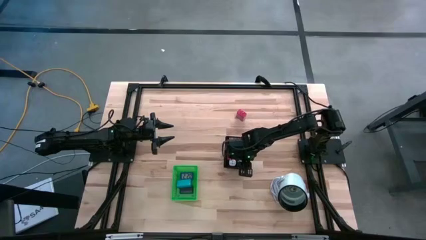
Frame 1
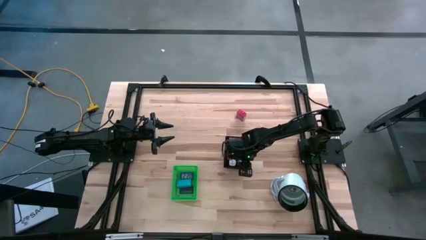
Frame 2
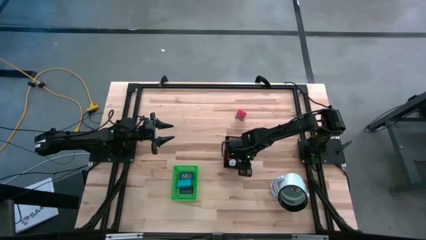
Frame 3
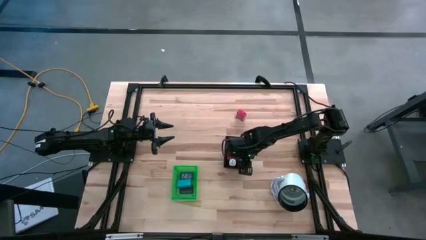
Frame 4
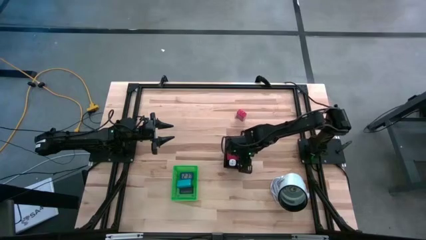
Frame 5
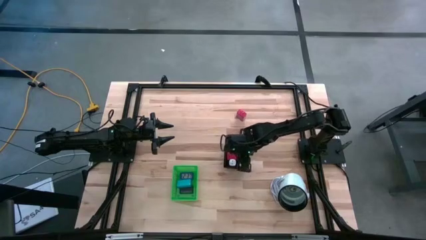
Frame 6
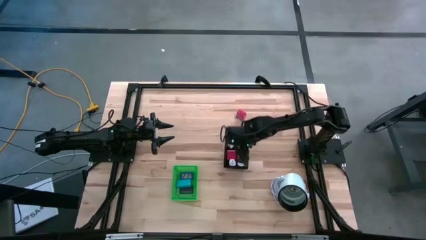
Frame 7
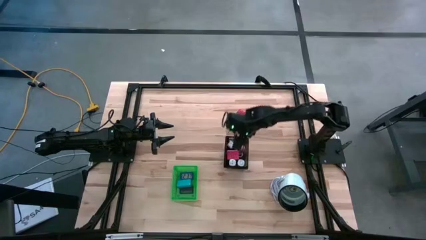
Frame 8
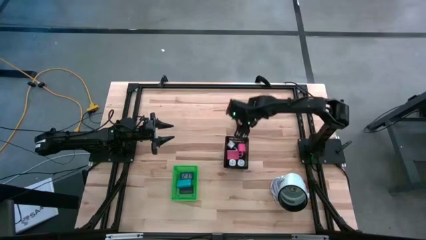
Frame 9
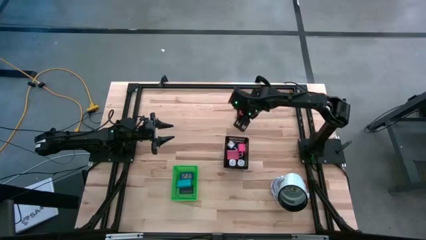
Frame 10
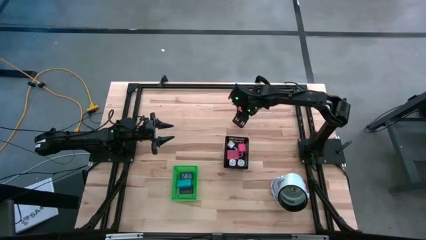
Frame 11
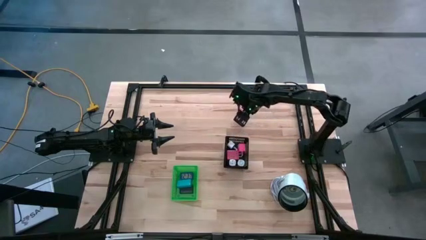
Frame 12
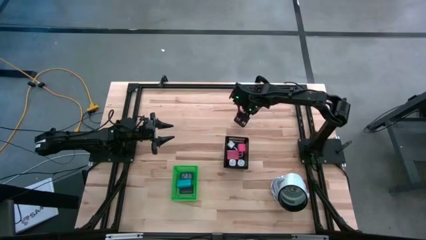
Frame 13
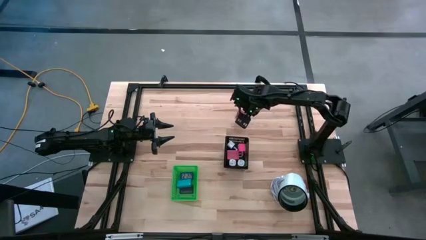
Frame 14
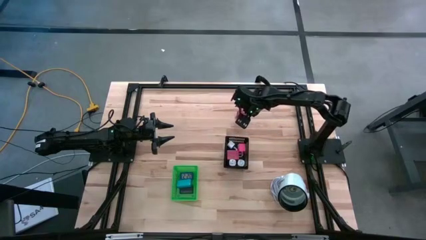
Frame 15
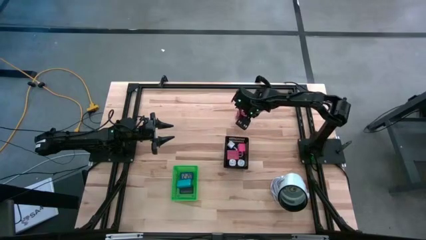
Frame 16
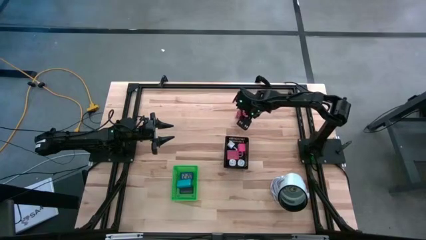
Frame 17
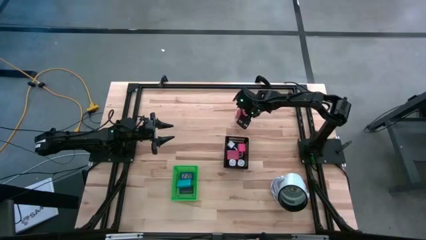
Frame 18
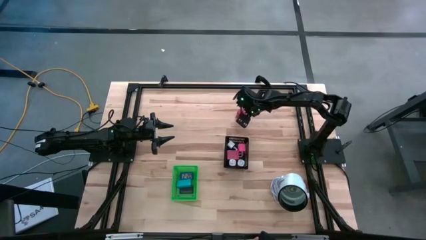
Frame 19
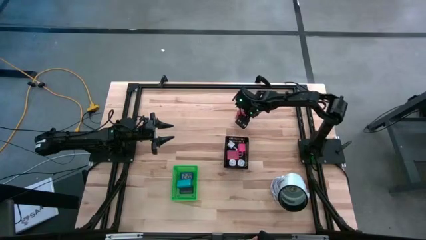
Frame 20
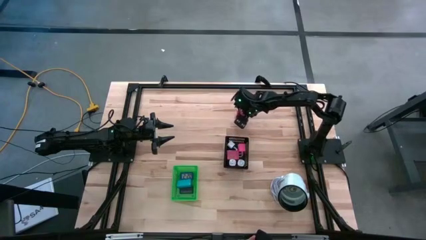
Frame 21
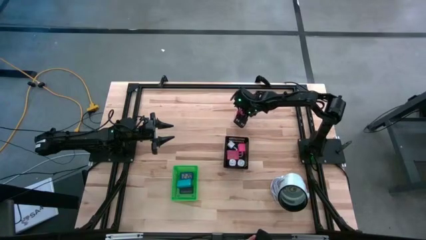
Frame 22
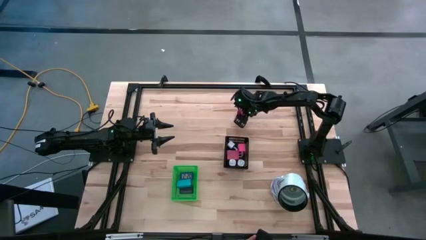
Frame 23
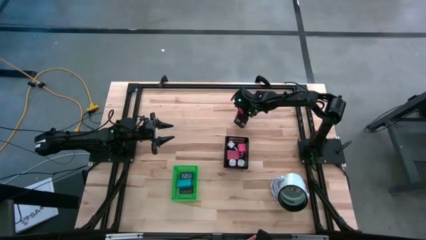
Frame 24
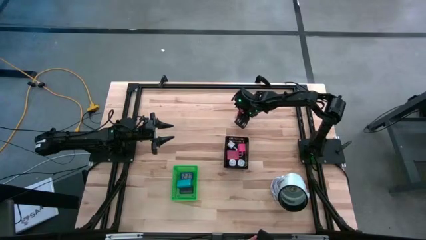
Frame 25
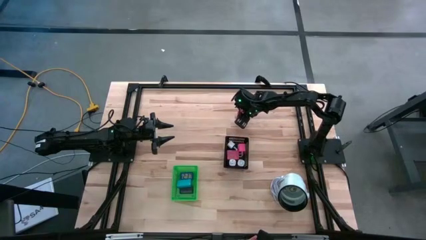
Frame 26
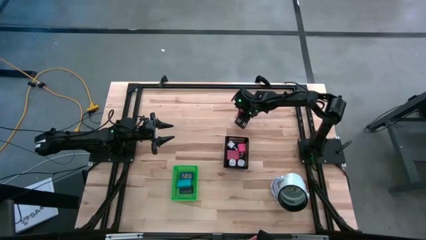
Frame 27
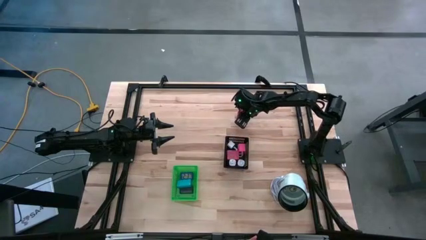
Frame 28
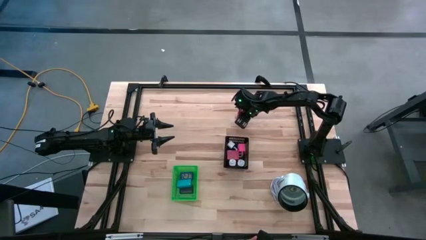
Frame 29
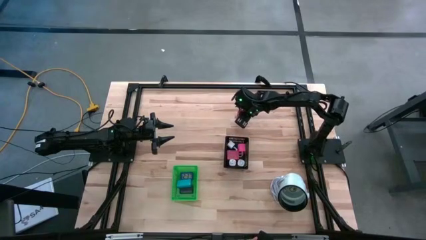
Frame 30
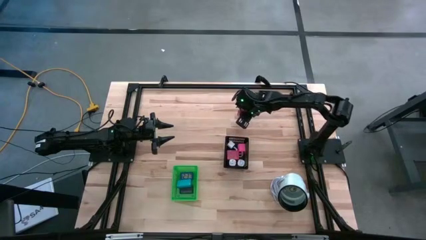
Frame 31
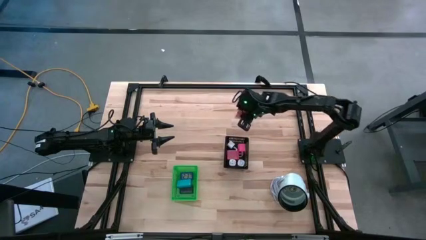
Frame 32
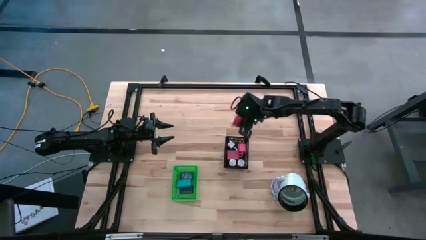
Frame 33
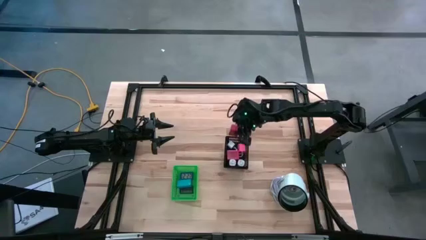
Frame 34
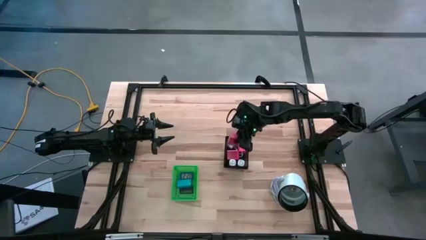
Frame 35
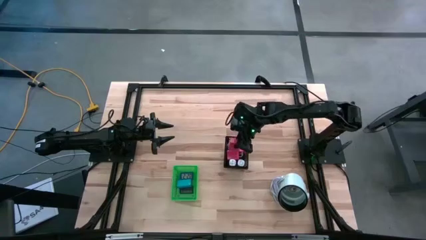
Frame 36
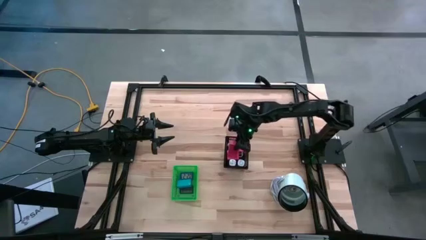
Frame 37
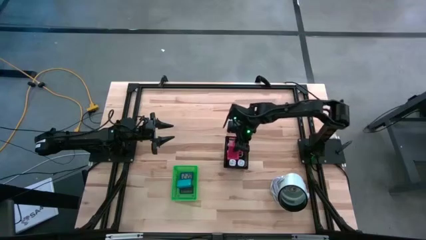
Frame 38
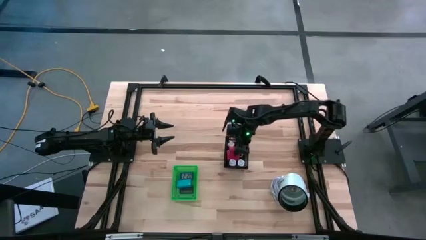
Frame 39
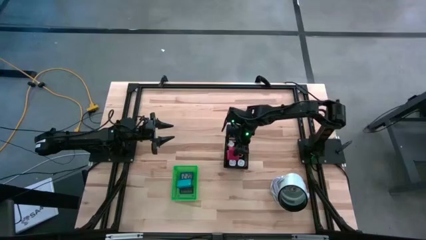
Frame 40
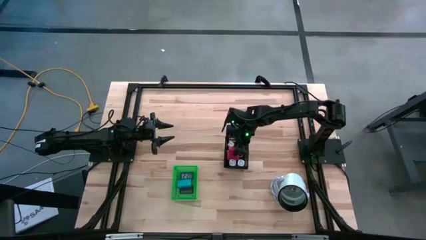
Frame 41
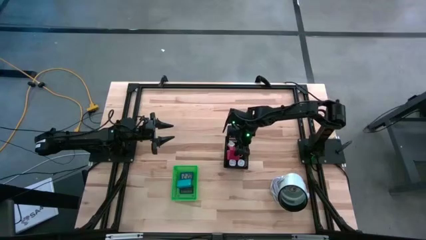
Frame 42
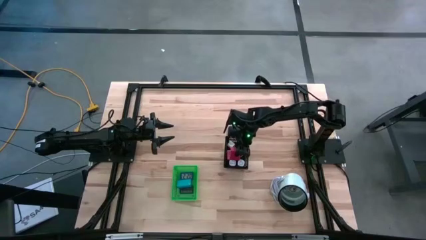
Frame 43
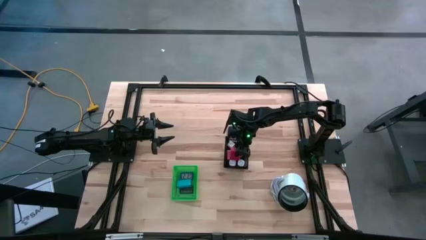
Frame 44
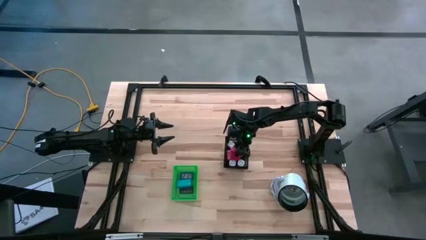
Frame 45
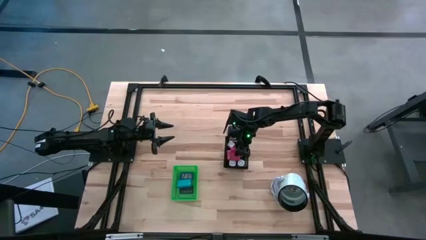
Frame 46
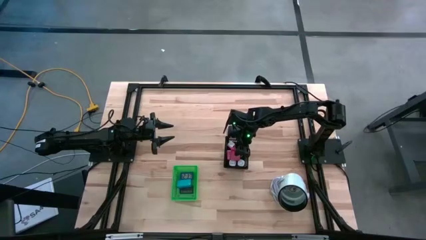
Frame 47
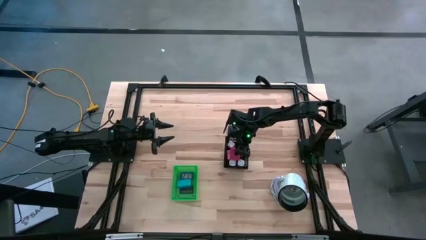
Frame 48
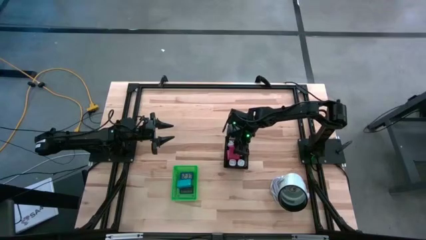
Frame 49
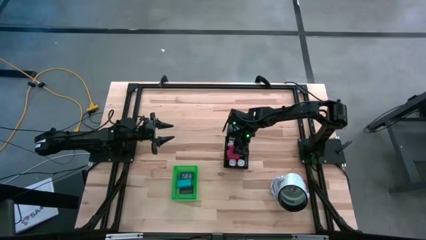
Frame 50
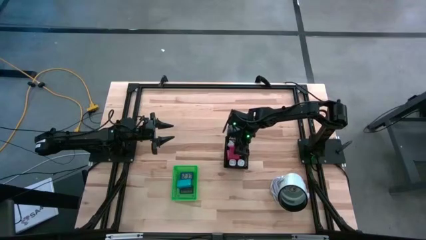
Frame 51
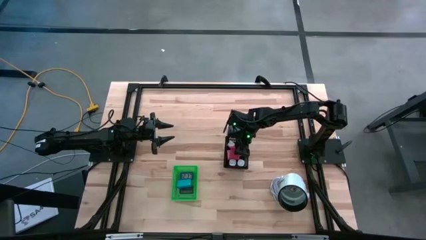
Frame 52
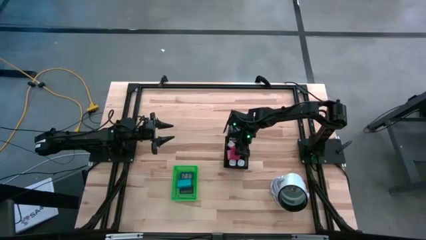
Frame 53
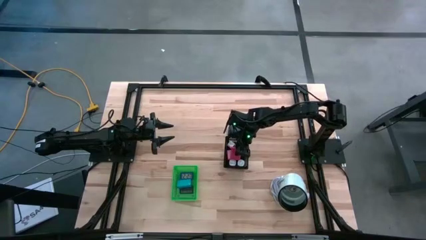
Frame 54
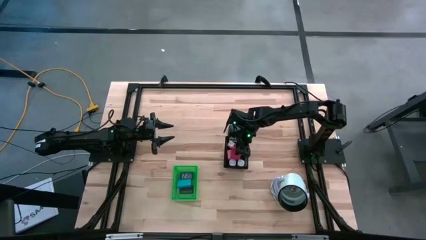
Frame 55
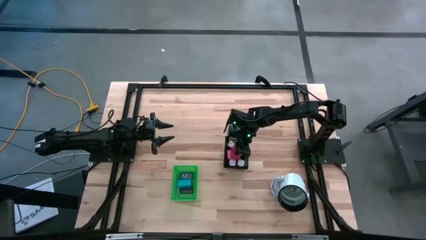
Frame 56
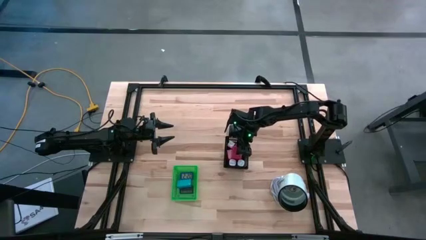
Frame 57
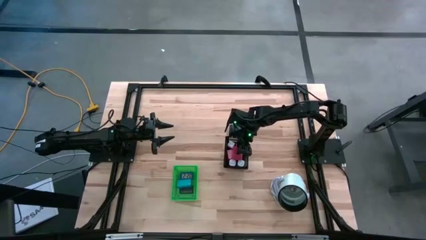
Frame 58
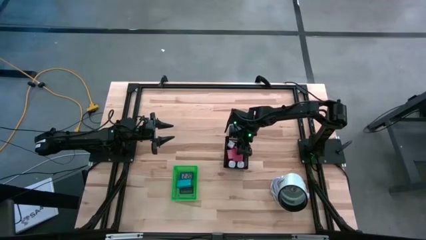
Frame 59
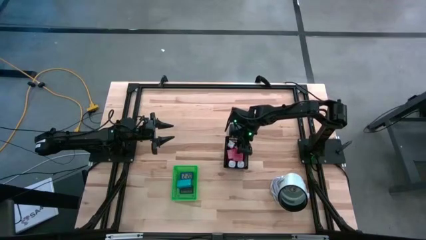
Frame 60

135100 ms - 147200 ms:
Task: Pick & Place Office items
Put the red charger adapter into the black bin
